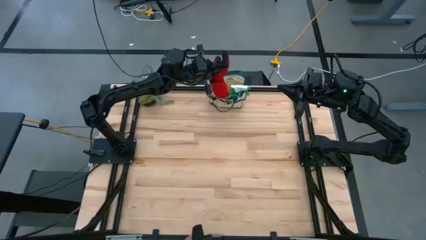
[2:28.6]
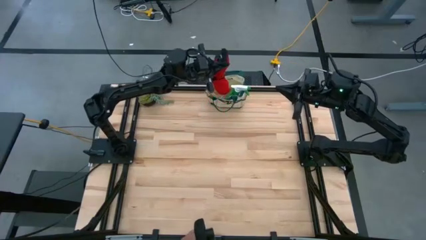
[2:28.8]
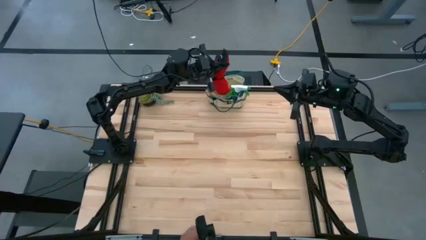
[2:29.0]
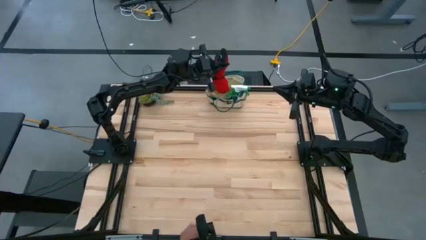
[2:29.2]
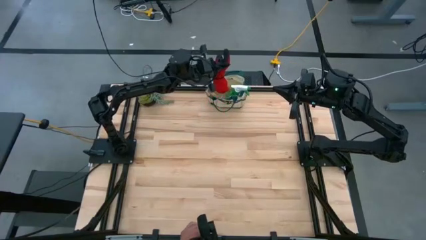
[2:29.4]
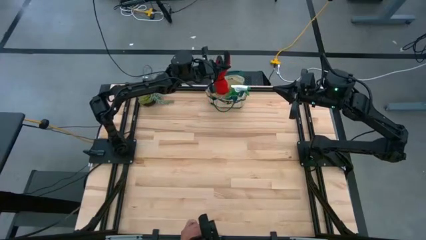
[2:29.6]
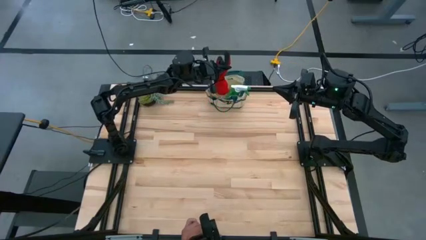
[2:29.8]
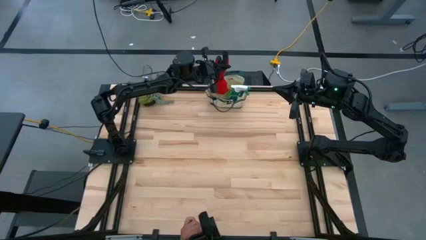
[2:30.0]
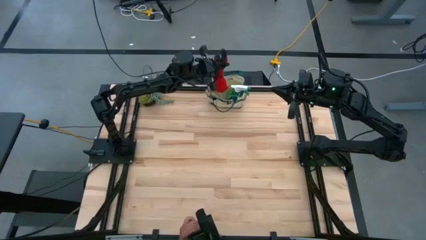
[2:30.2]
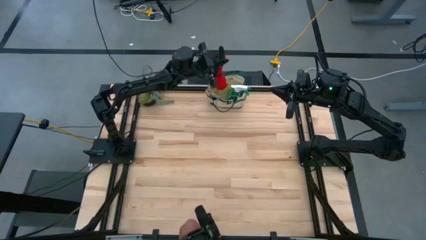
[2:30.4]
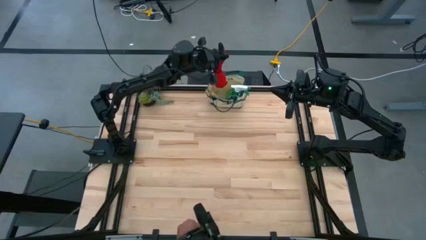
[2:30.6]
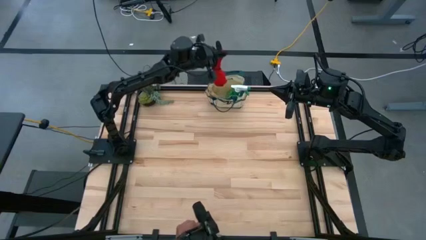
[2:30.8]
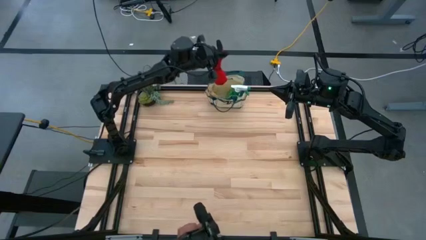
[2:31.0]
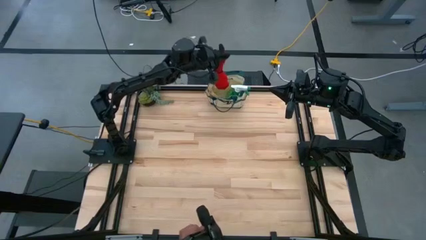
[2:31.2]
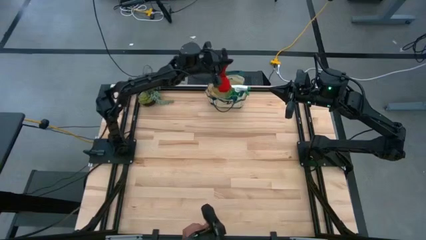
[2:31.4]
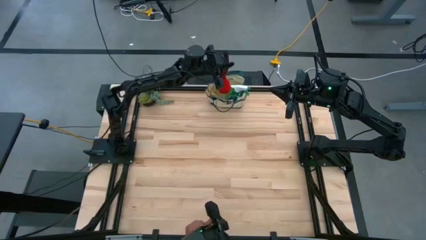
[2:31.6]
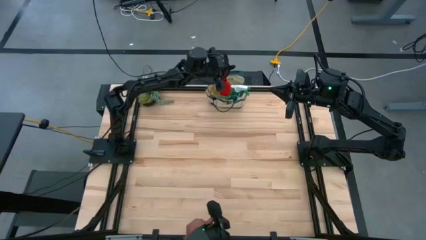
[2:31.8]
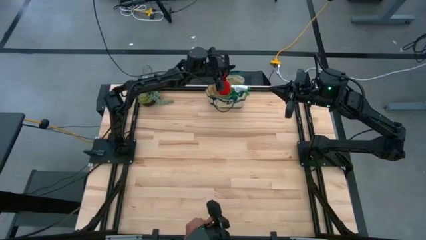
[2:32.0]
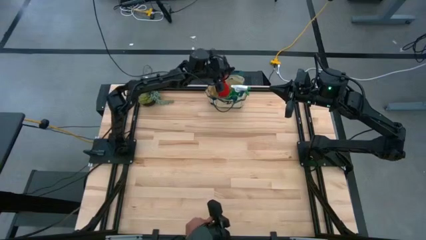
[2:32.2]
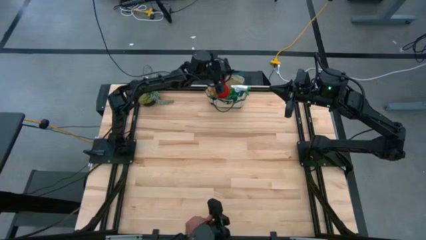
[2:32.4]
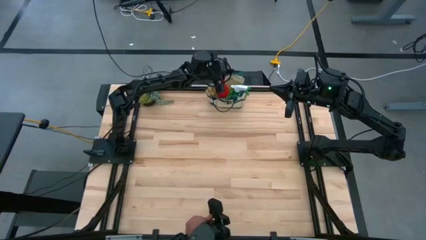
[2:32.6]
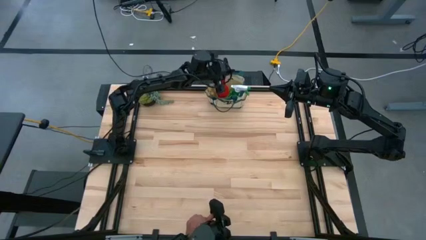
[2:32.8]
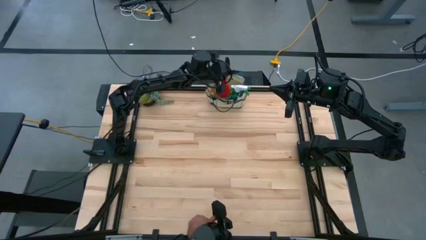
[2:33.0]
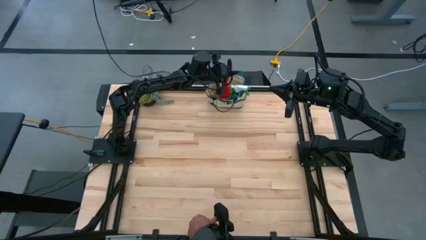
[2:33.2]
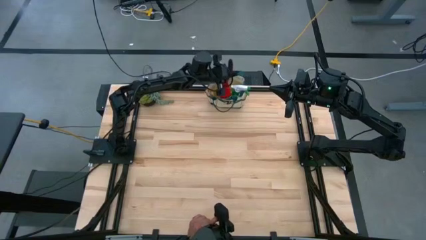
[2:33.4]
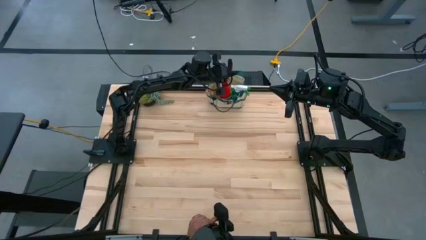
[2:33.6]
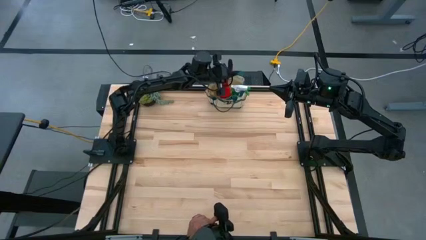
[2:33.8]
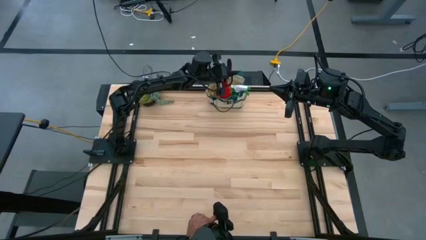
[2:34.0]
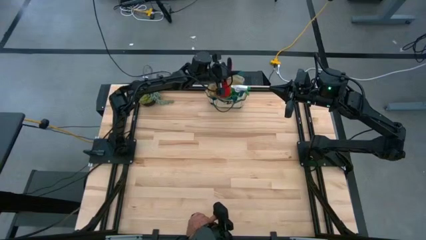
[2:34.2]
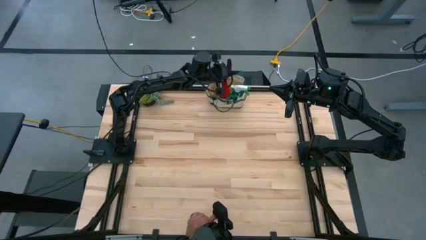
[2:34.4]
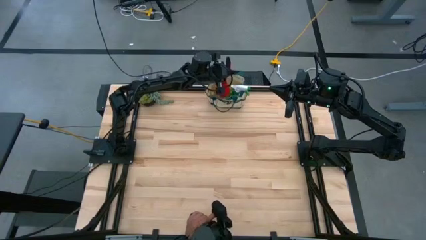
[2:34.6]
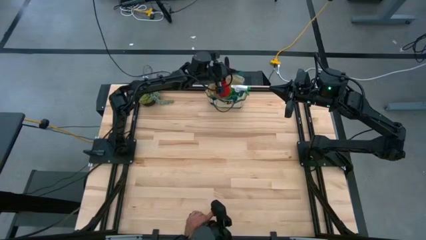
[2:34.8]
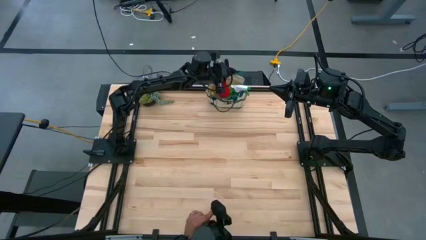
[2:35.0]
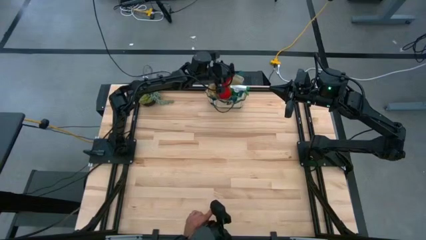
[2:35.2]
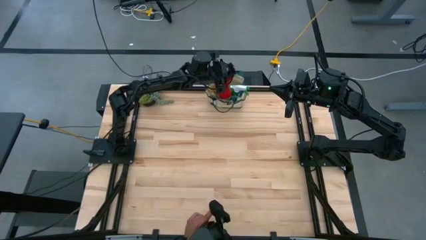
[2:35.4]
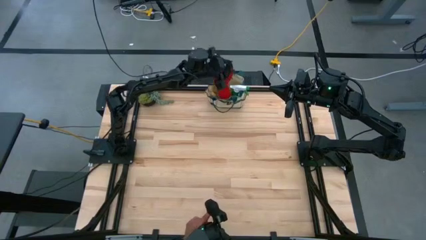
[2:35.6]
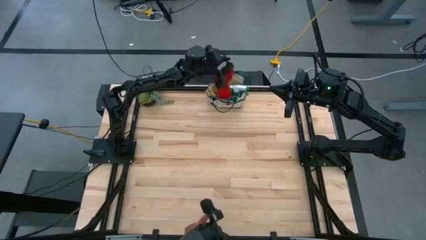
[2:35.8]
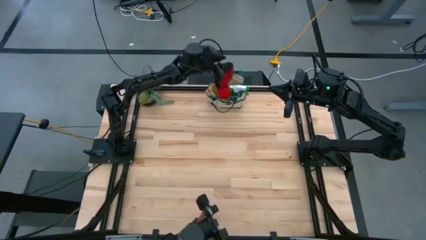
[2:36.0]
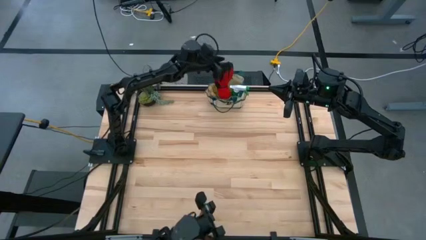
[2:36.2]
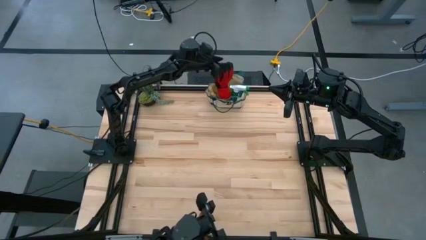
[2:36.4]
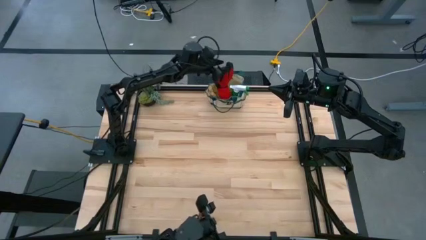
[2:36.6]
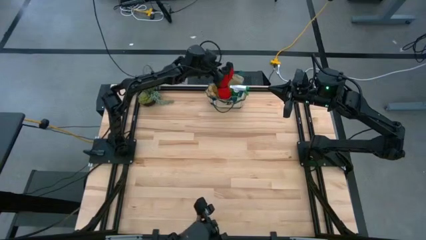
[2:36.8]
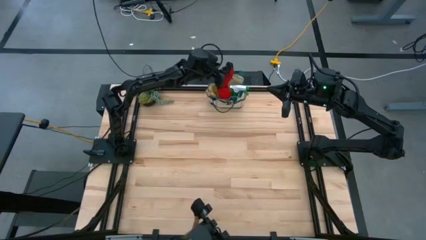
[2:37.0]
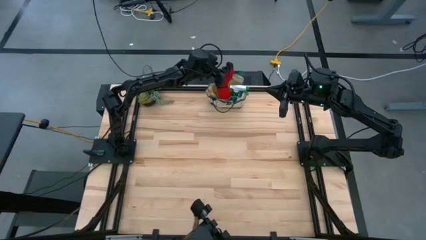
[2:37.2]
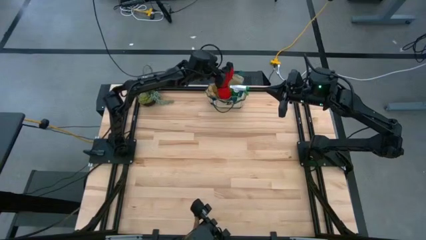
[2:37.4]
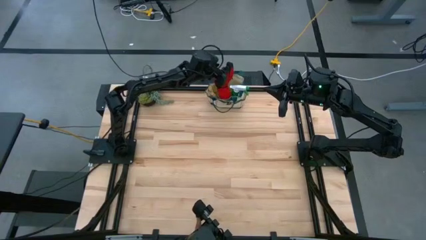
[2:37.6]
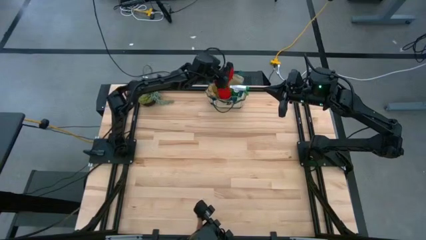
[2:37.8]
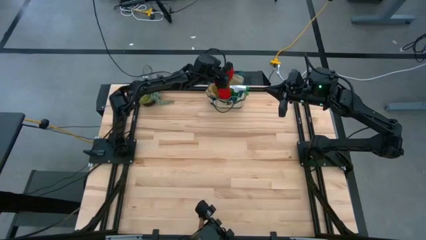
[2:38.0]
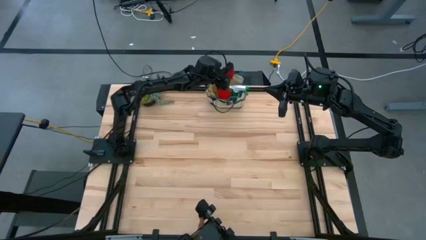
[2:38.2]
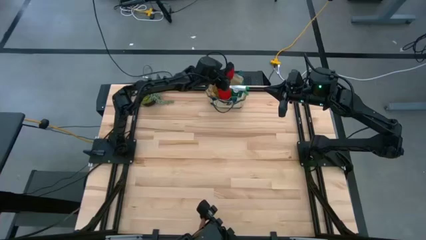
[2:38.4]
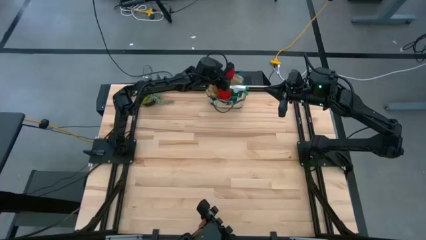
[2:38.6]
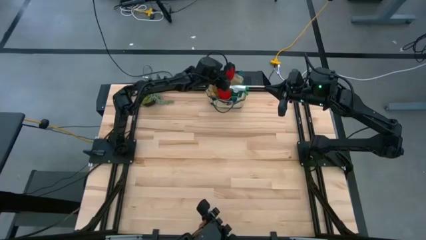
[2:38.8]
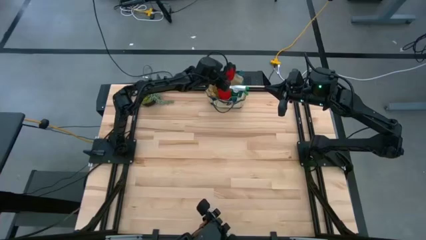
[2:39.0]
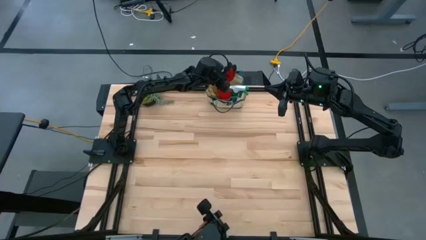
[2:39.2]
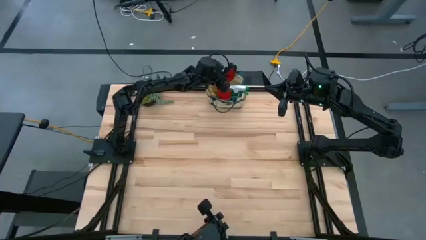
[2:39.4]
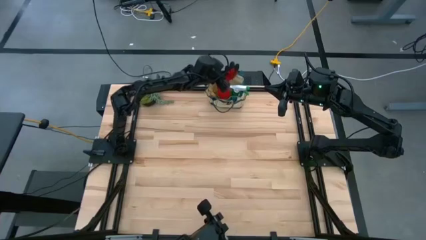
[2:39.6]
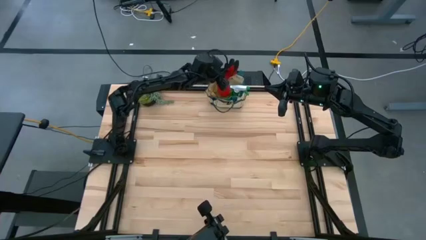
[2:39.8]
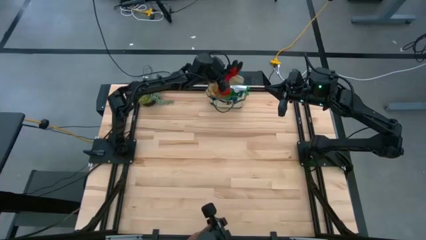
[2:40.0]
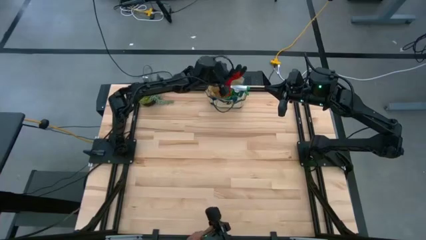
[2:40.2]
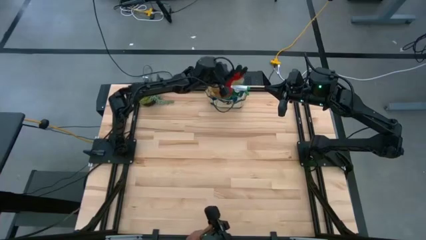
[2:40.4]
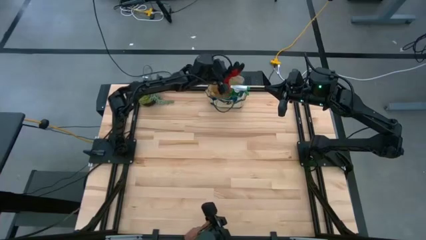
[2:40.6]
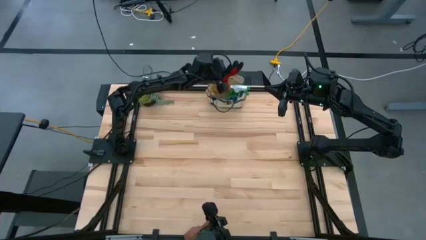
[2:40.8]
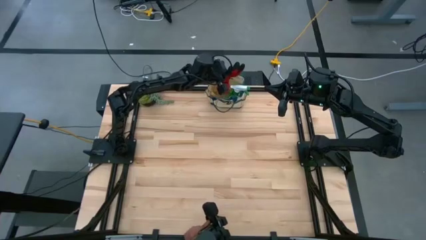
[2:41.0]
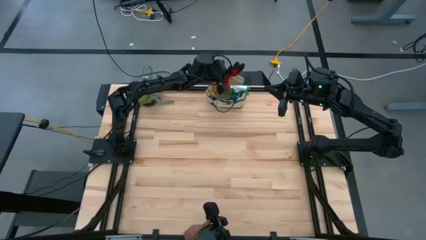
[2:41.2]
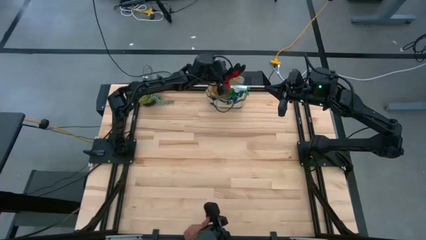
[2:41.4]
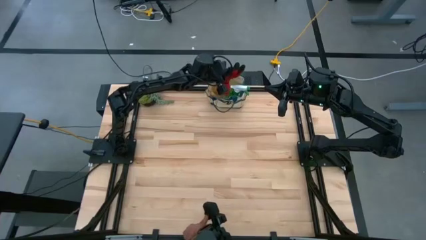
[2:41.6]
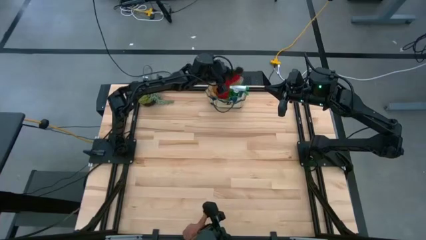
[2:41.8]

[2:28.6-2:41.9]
Task: Pick & Place Garden tools in Gardening bag
Put the red gloves into the white gardening bag

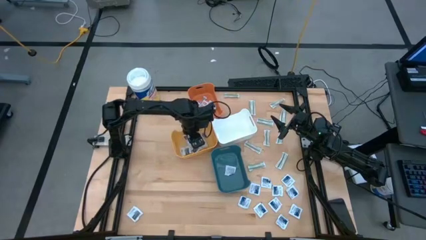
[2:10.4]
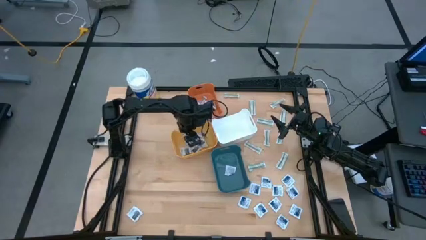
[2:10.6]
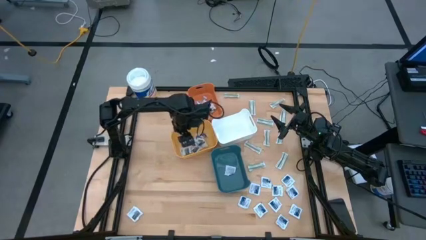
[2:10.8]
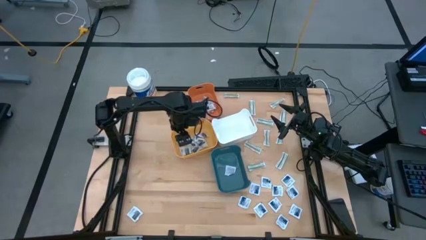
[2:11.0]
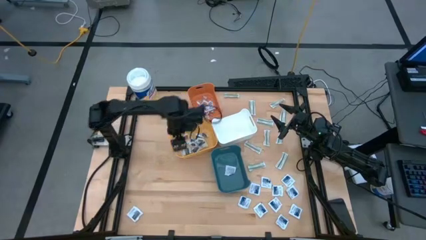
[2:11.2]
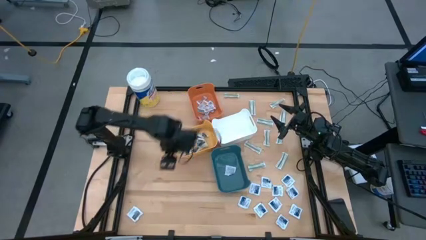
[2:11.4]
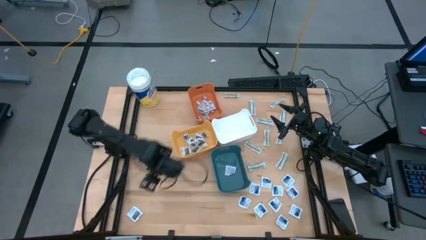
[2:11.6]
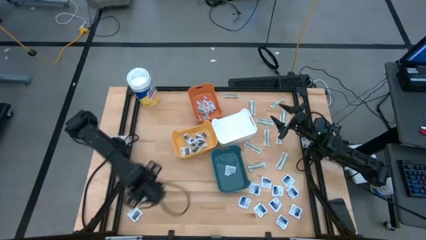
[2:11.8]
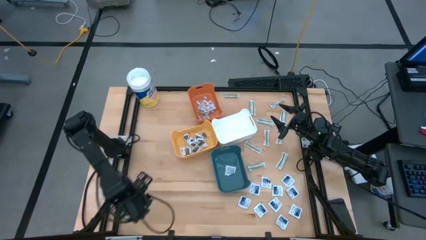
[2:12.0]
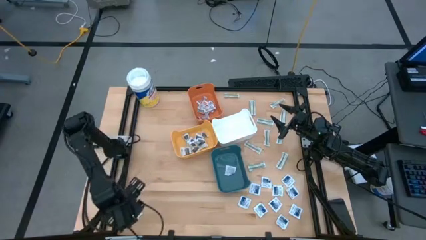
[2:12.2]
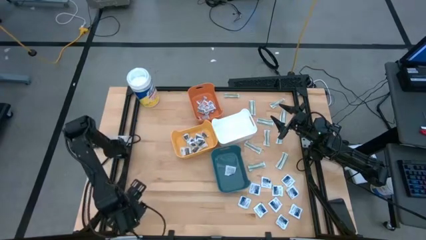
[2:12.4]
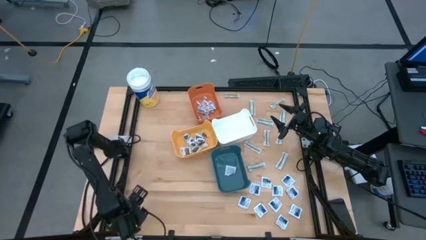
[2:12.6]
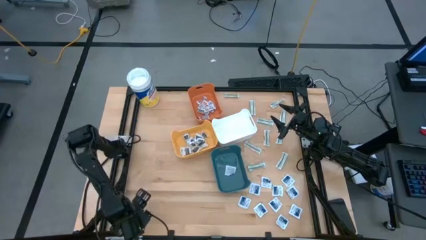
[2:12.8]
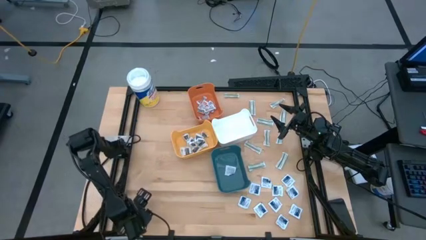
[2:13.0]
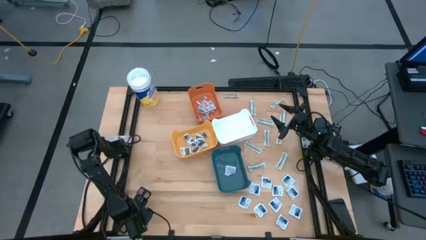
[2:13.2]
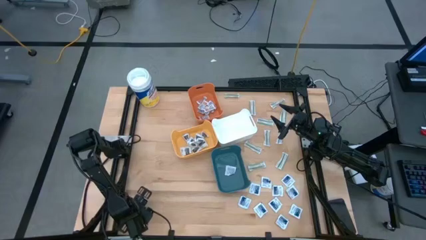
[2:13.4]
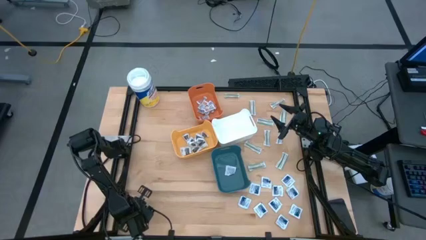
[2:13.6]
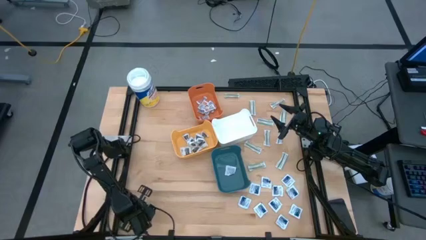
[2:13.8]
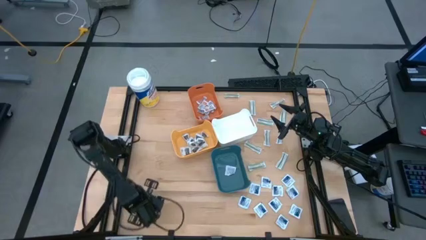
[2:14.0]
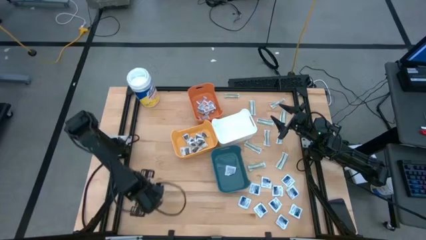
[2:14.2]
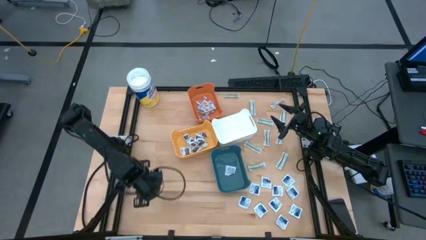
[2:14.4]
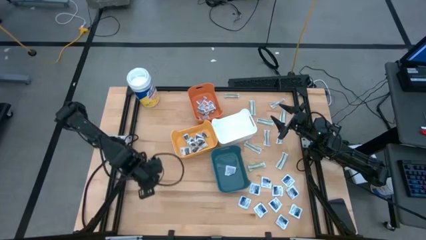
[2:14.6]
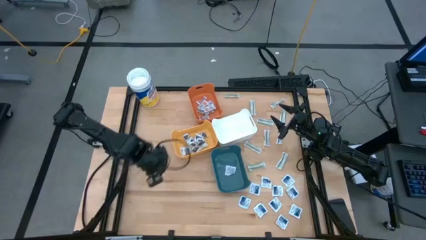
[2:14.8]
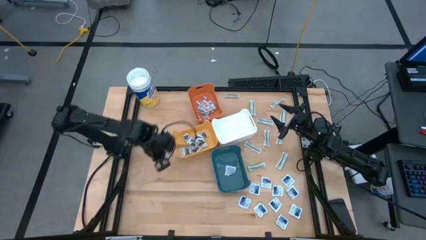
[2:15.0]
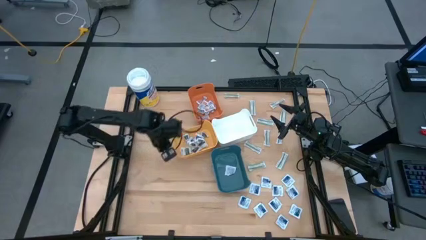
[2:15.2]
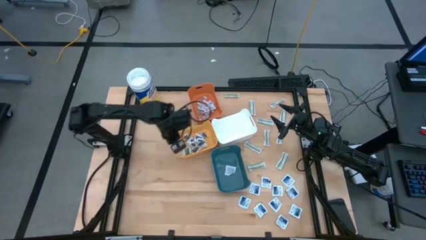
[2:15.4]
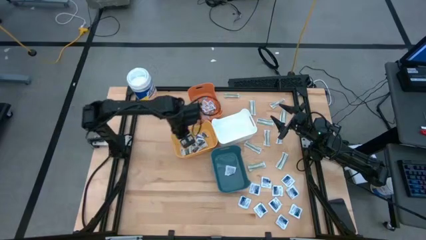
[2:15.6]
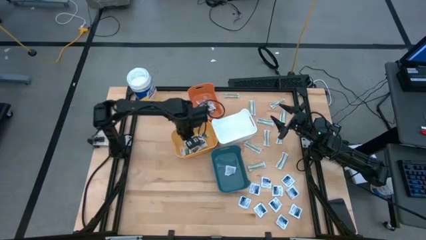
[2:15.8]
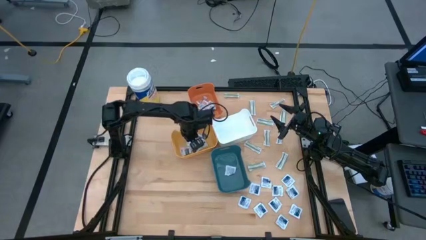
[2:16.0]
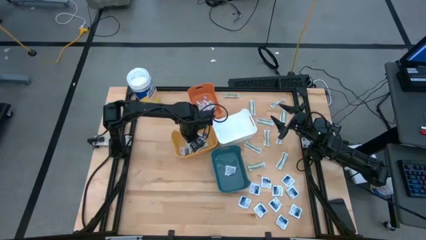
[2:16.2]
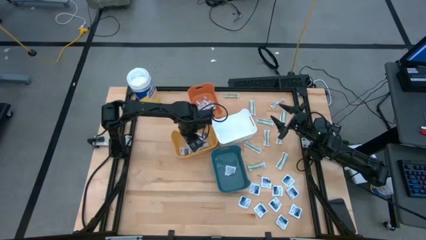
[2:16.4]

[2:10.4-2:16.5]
Task: Pick & Place First Aid Supplies
Put the black towelette pack into the yellow bin
